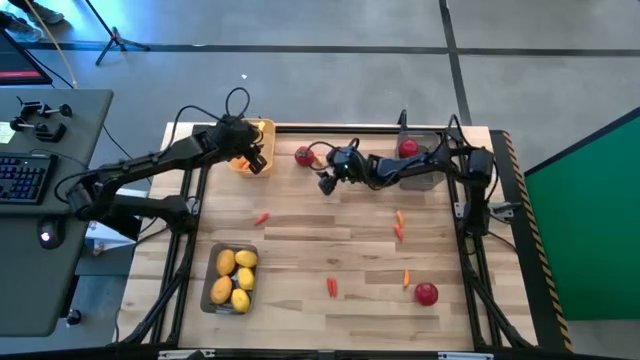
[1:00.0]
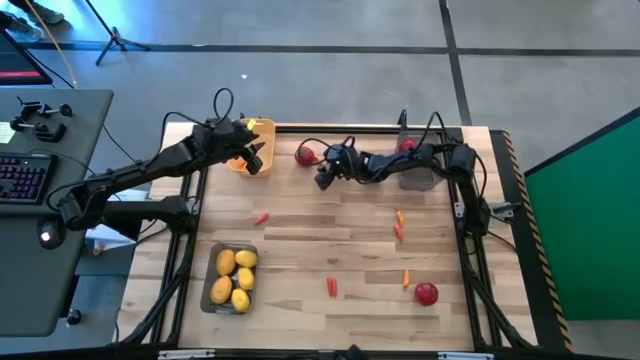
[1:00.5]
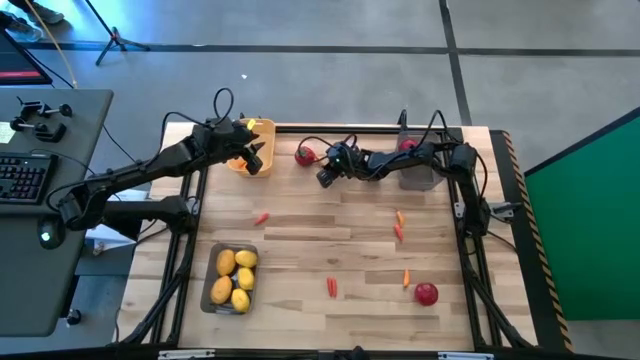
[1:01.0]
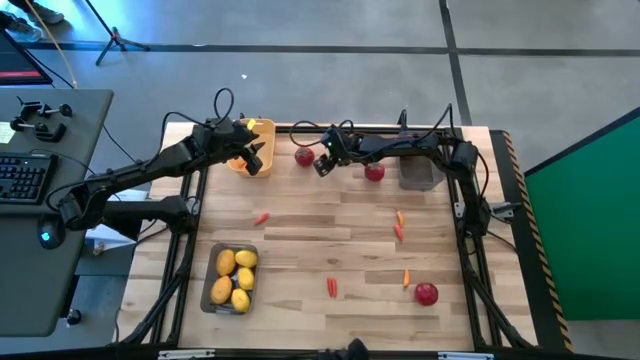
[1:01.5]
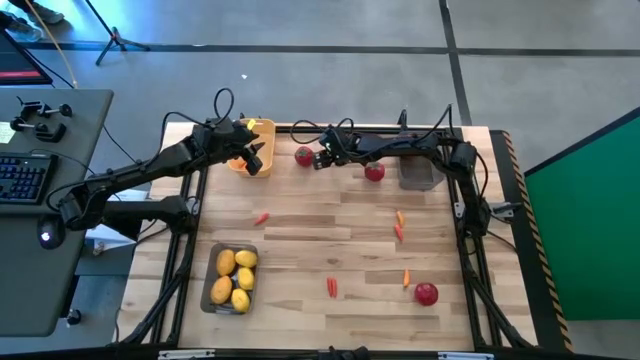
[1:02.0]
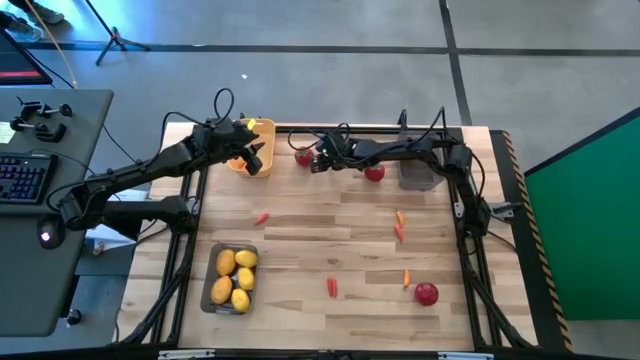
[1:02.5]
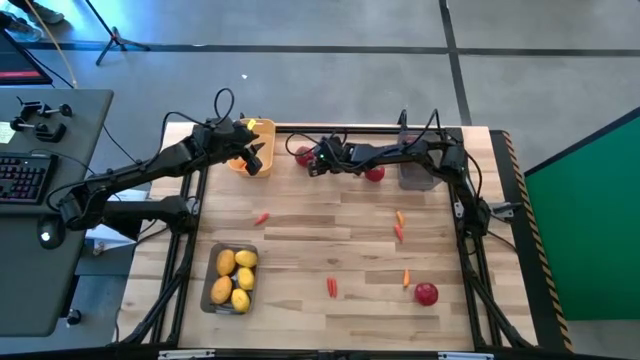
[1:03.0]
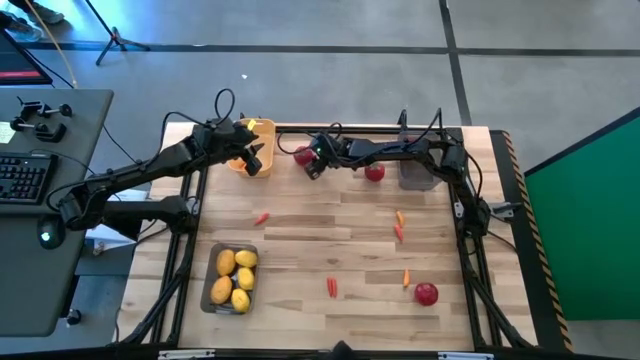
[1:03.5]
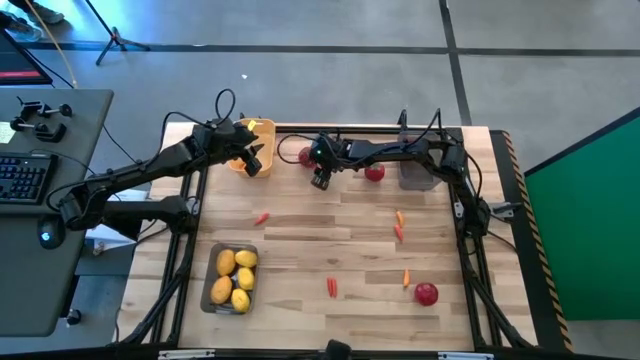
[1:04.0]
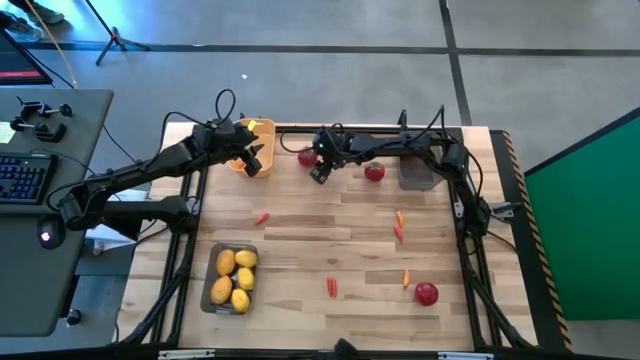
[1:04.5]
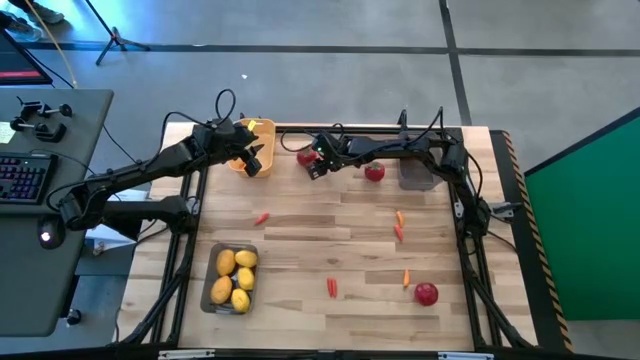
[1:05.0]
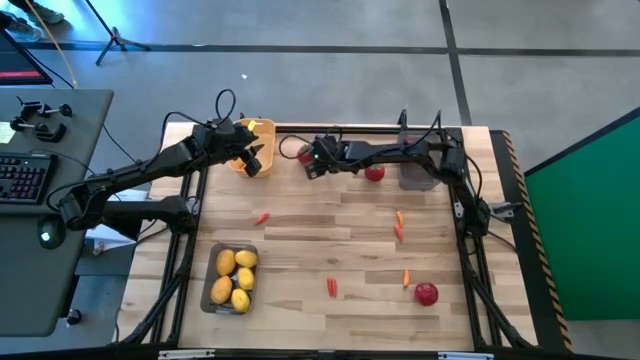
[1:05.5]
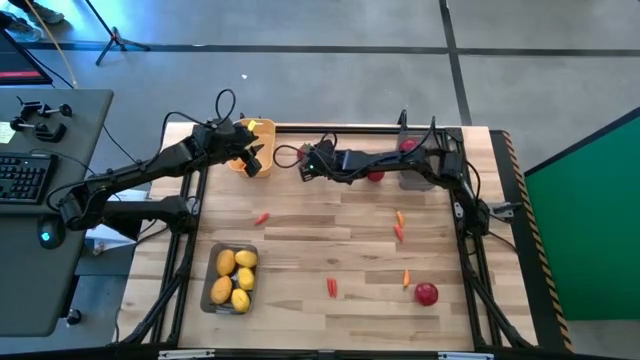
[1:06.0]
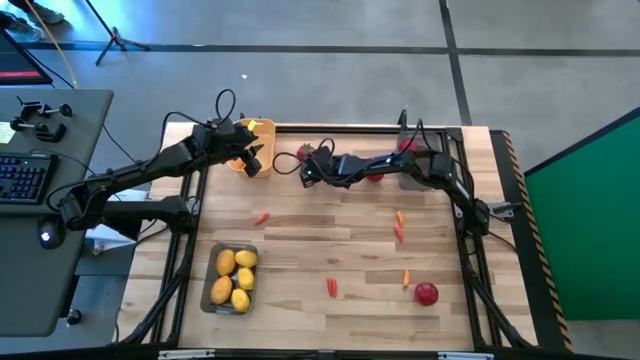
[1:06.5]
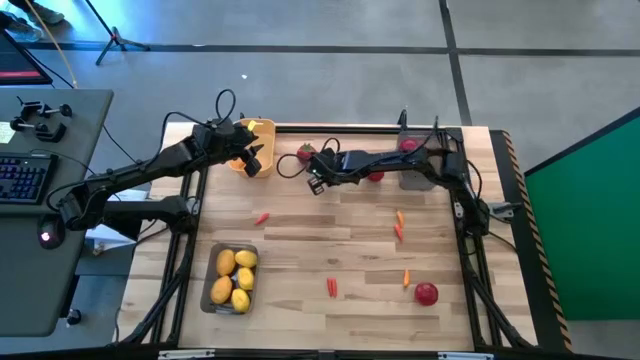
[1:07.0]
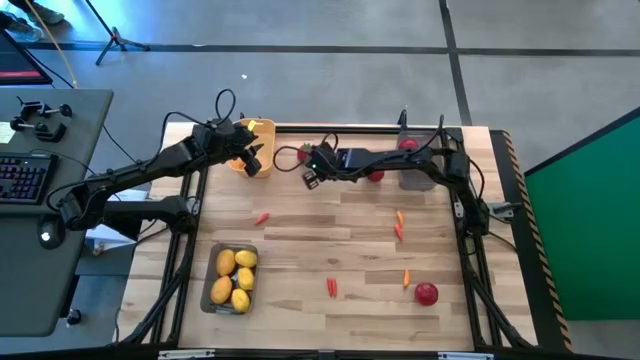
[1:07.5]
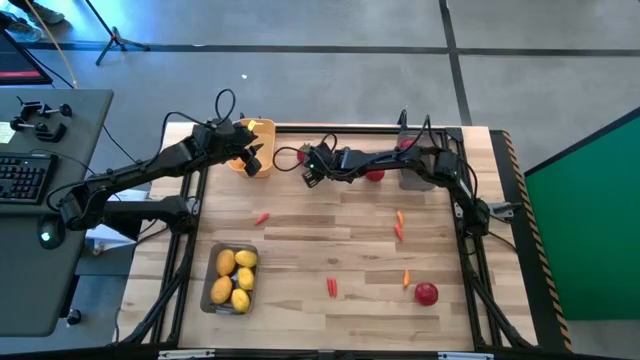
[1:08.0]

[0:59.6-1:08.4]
Task: Sort produce into baskets
Put the chili pepper into the orange bin

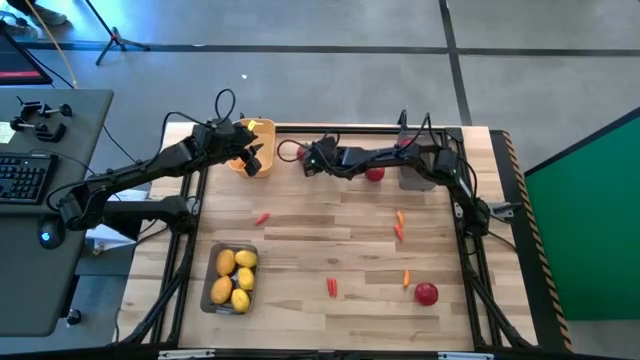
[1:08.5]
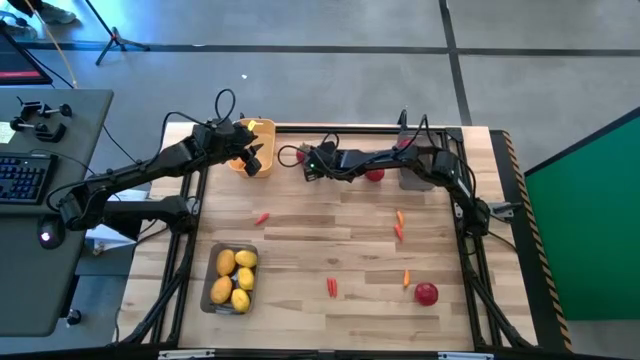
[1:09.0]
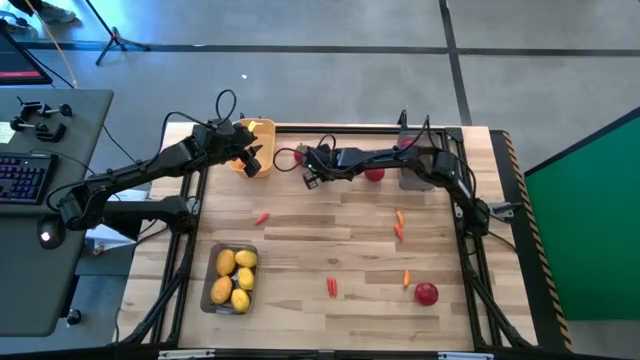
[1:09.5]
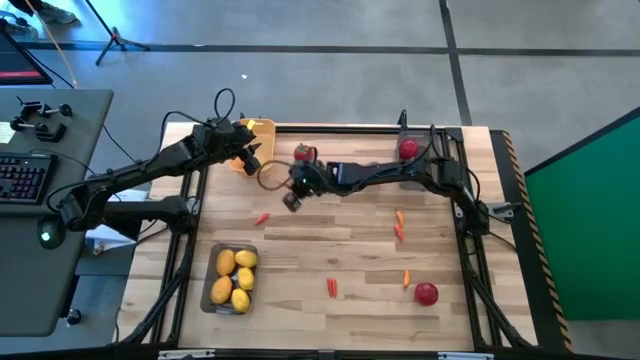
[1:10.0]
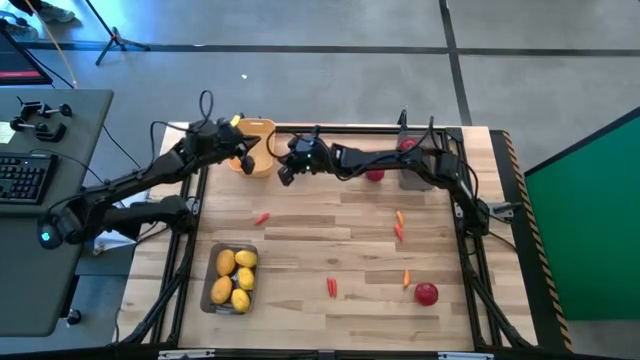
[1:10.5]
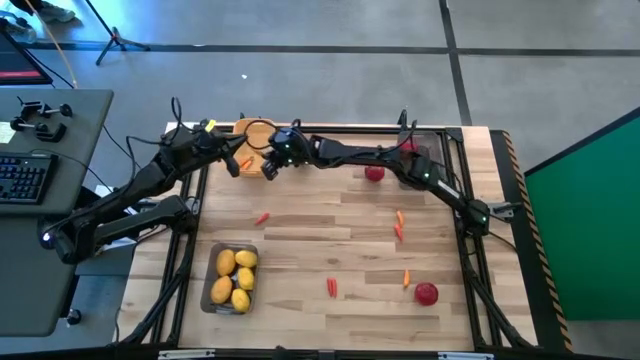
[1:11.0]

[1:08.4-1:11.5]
Put the chili pepper into the orange bin

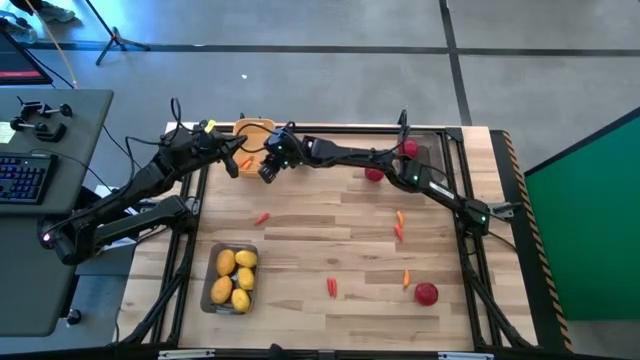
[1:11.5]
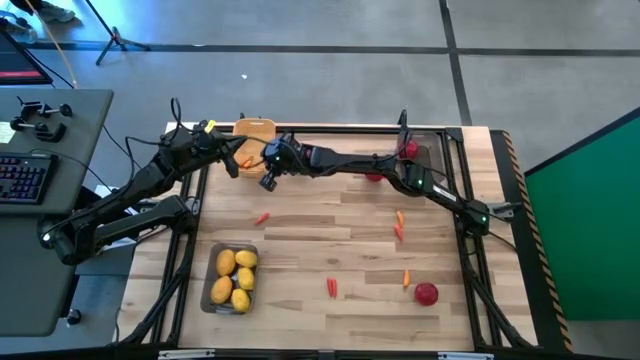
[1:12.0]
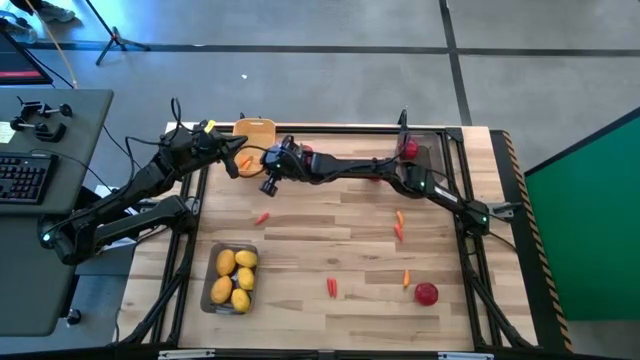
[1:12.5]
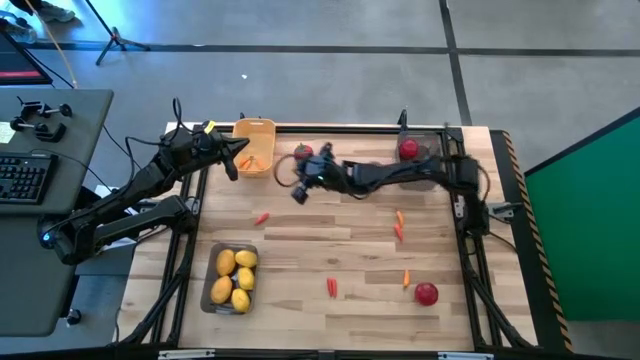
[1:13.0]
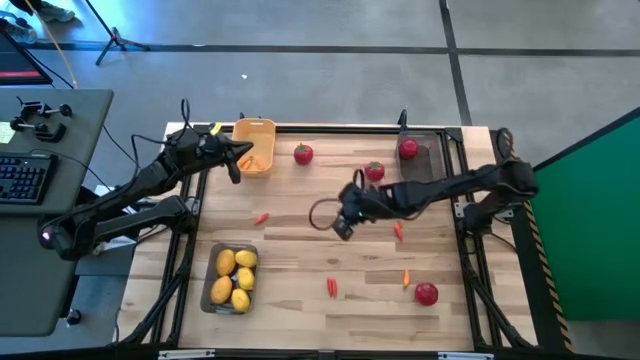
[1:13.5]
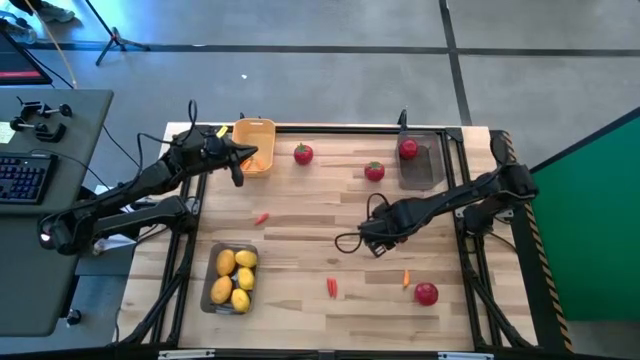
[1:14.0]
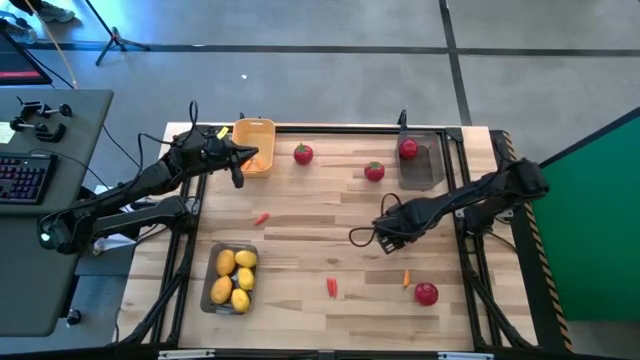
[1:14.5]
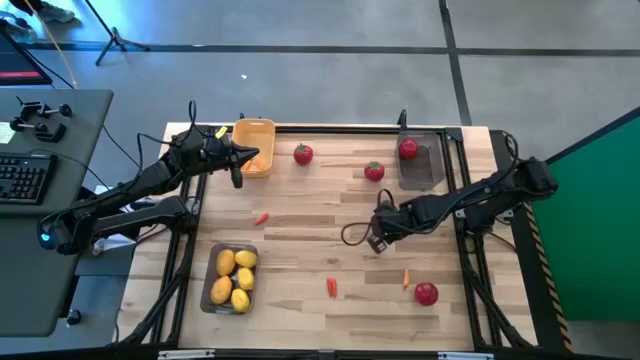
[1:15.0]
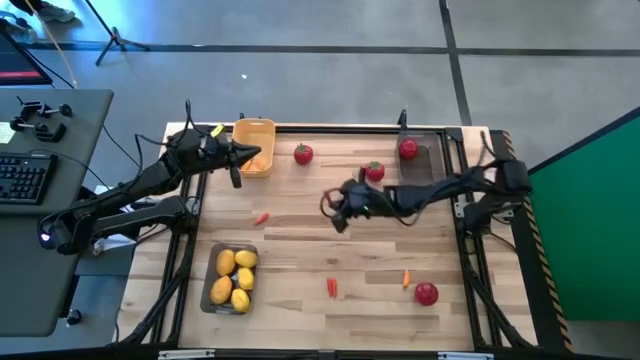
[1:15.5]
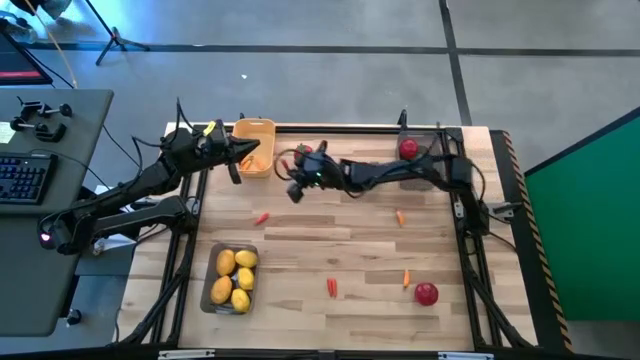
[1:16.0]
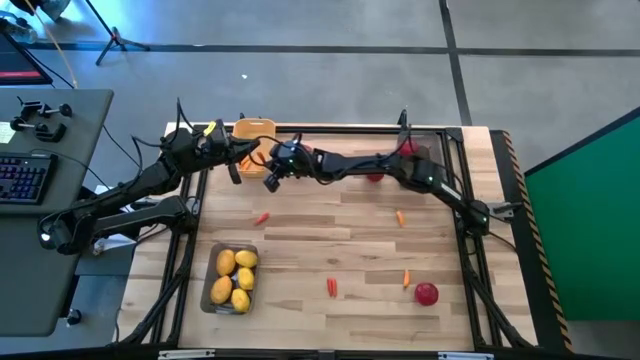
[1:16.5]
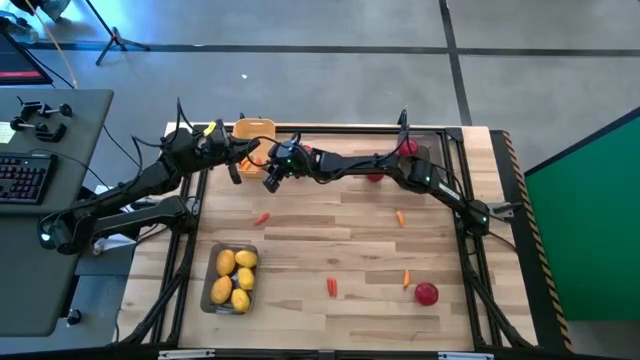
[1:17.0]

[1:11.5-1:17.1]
Put the chili pepper into the orange bin

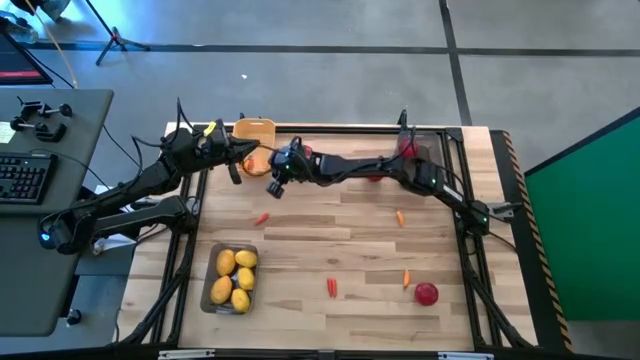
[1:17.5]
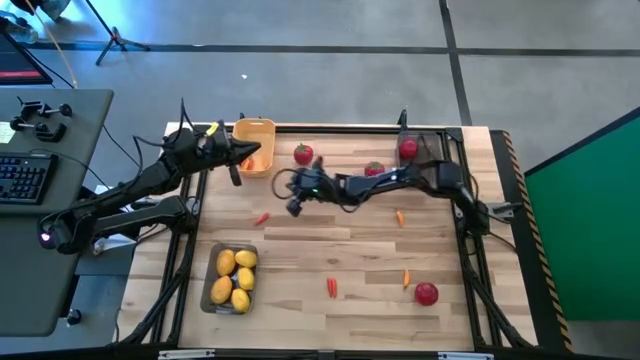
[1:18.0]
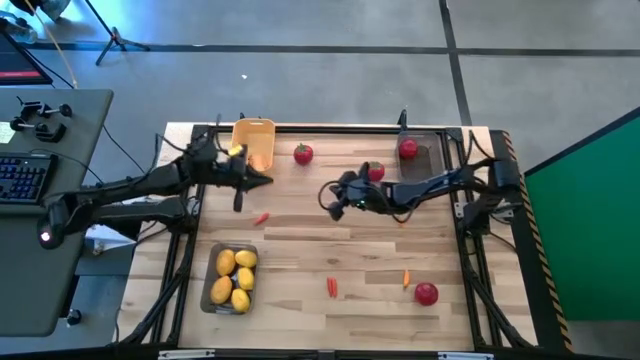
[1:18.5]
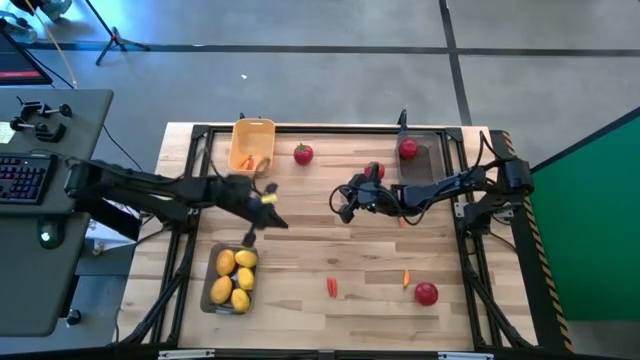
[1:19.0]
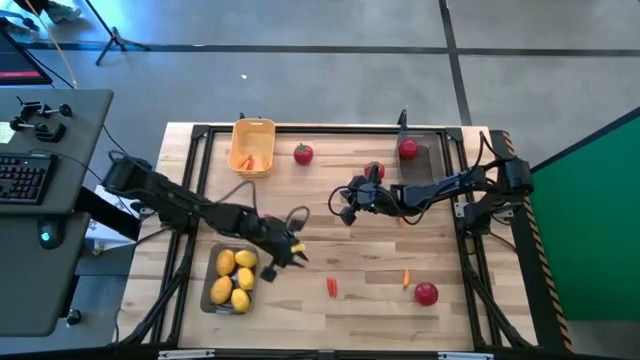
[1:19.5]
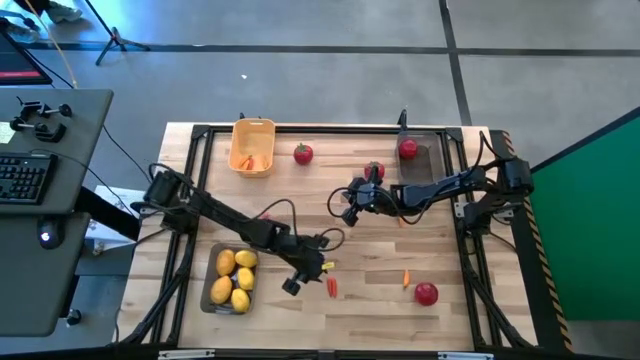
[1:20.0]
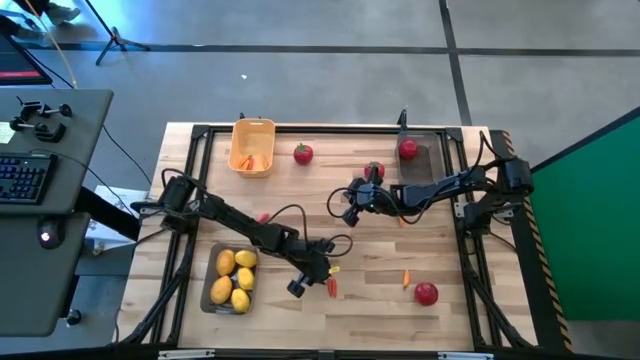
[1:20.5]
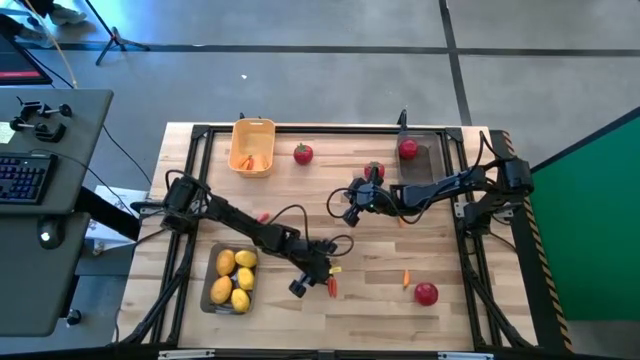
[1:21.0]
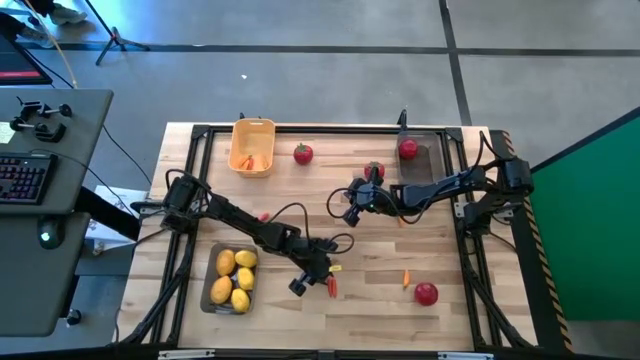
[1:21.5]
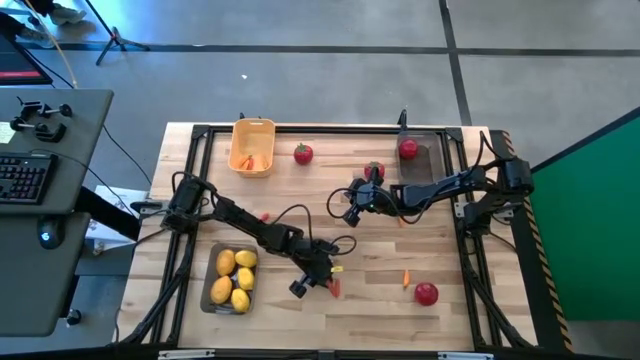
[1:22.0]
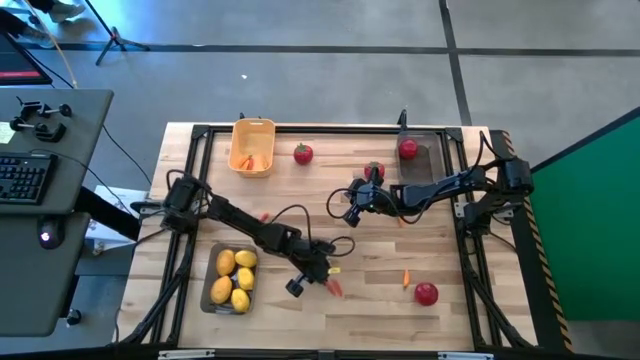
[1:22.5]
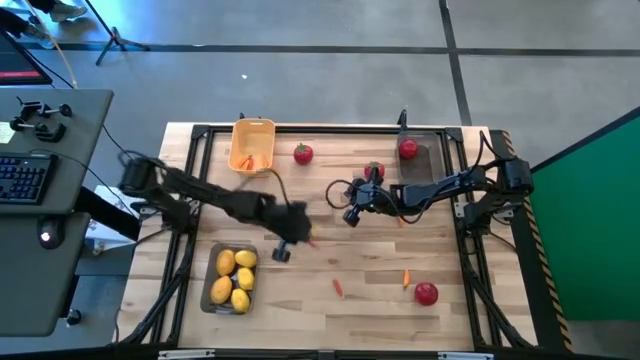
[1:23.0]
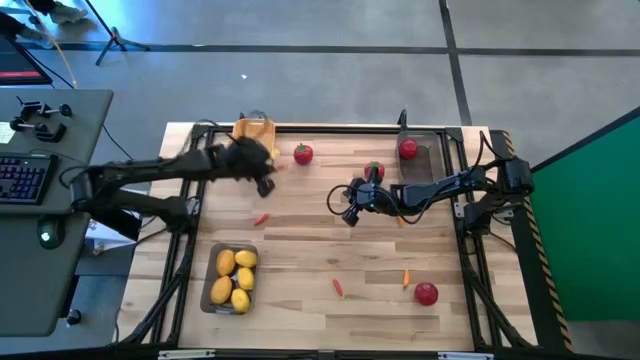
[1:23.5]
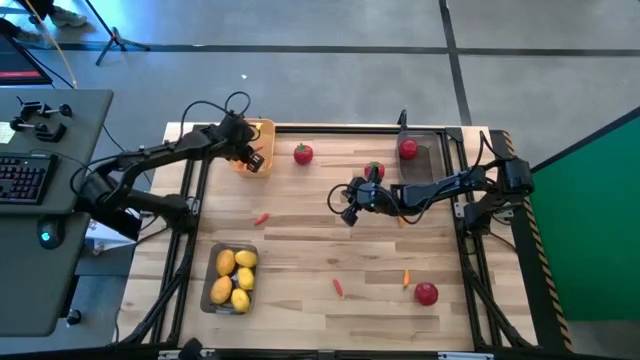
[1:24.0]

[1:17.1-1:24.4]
Put the chili pepper into the orange bin
